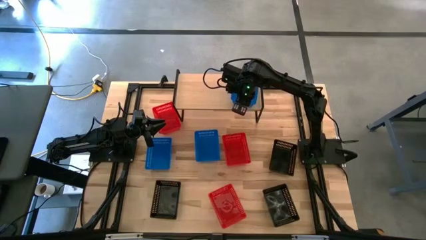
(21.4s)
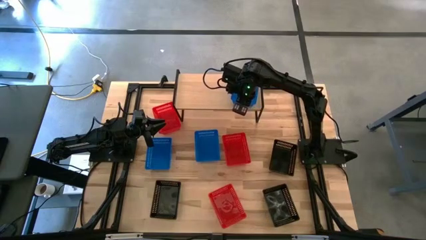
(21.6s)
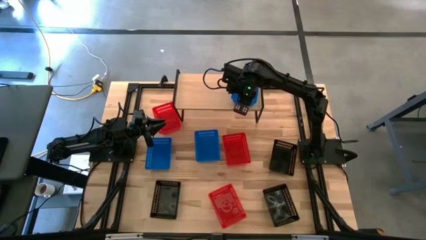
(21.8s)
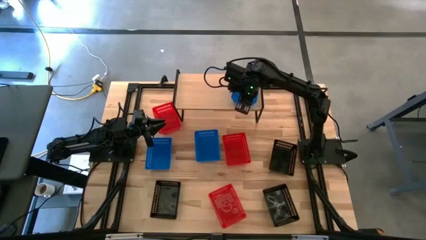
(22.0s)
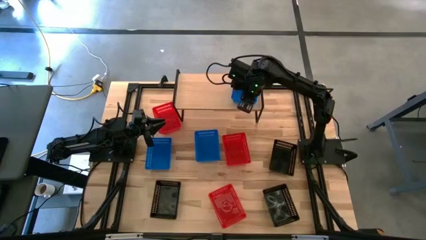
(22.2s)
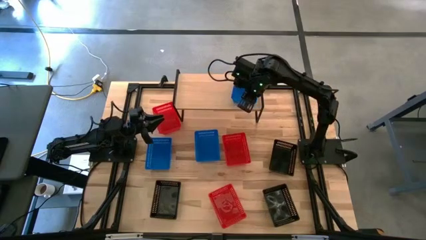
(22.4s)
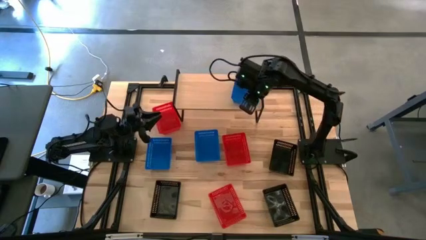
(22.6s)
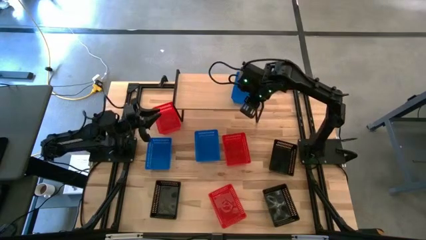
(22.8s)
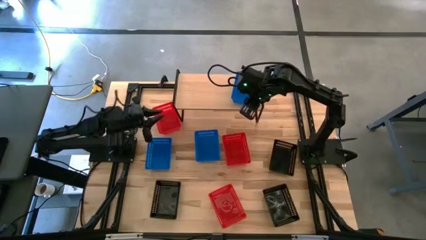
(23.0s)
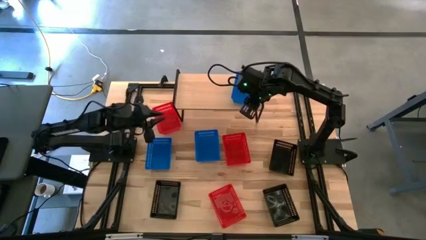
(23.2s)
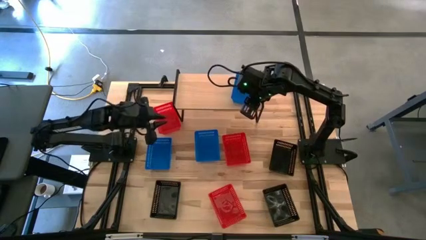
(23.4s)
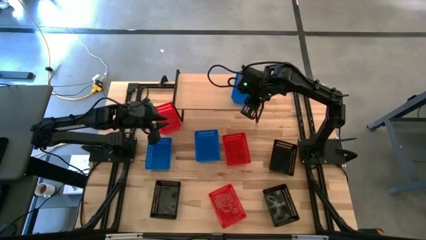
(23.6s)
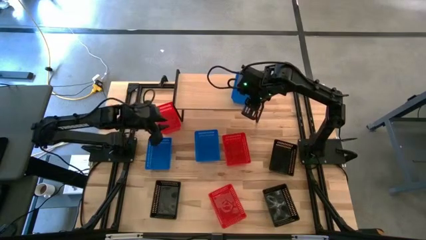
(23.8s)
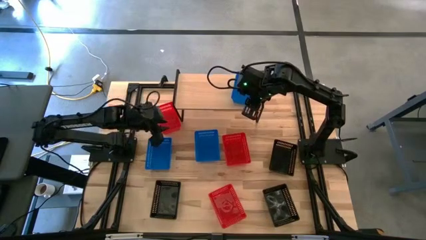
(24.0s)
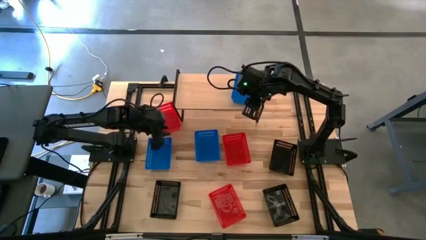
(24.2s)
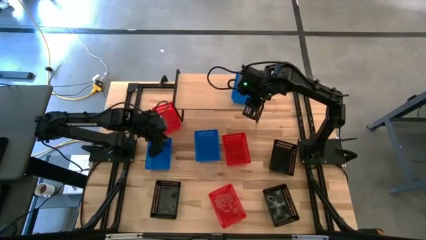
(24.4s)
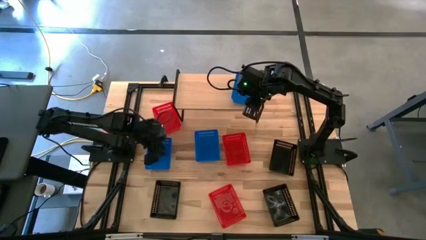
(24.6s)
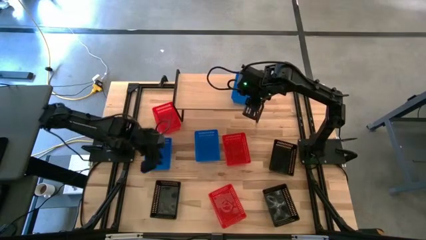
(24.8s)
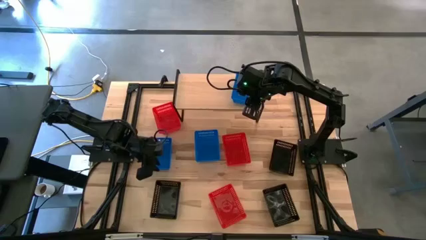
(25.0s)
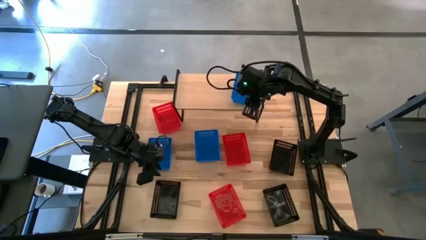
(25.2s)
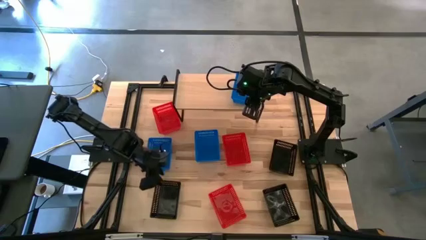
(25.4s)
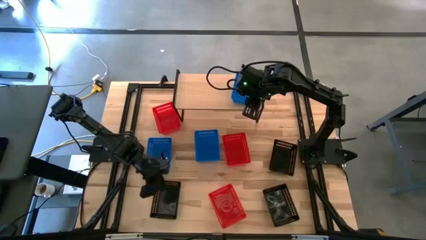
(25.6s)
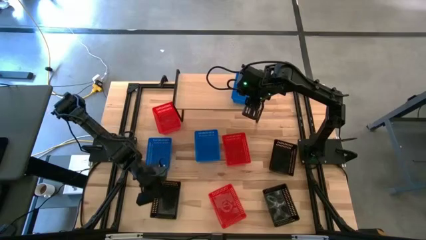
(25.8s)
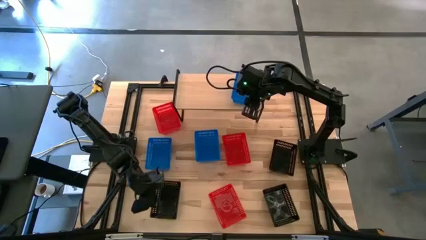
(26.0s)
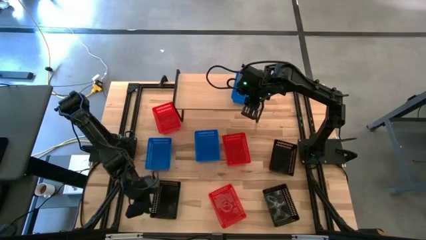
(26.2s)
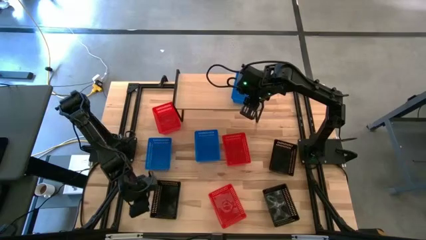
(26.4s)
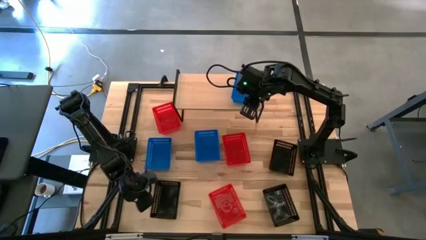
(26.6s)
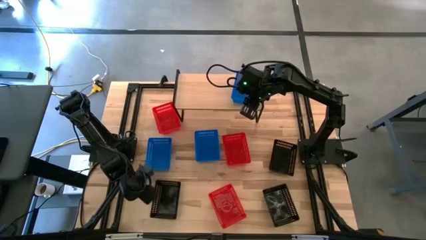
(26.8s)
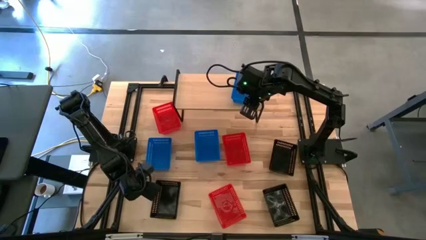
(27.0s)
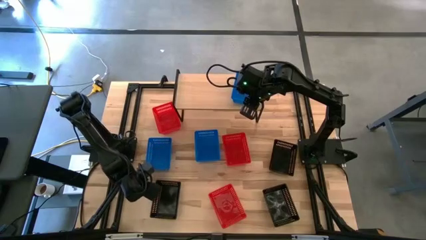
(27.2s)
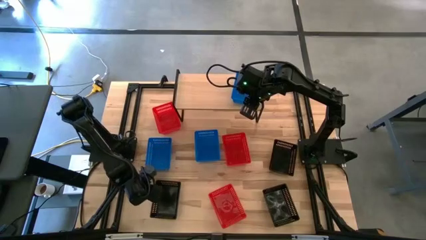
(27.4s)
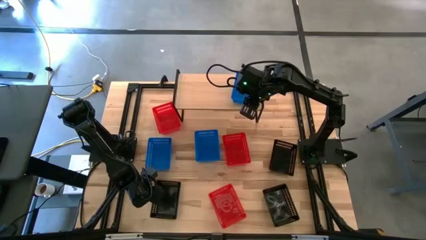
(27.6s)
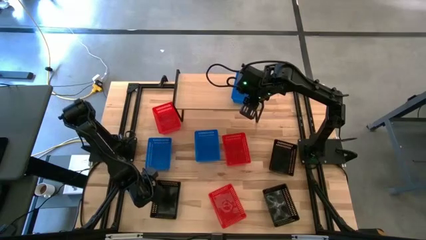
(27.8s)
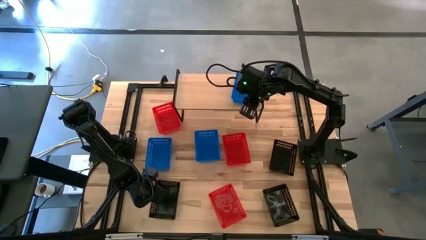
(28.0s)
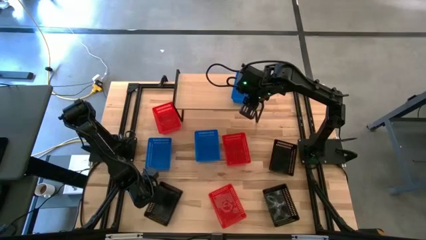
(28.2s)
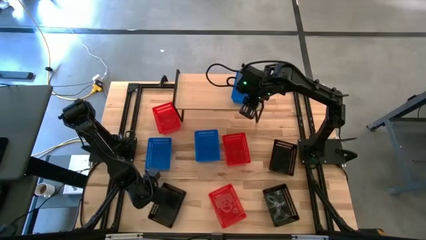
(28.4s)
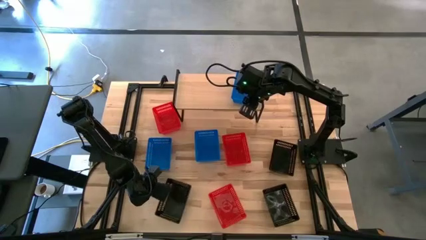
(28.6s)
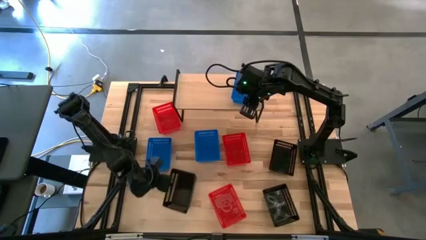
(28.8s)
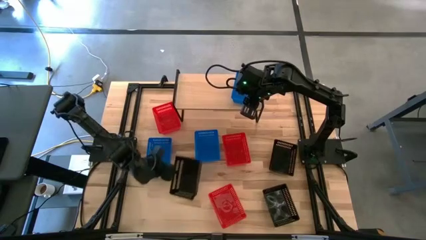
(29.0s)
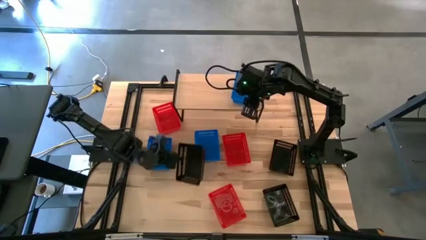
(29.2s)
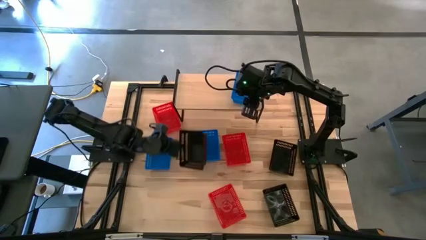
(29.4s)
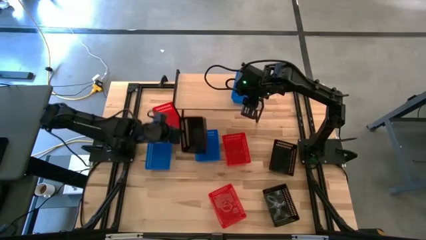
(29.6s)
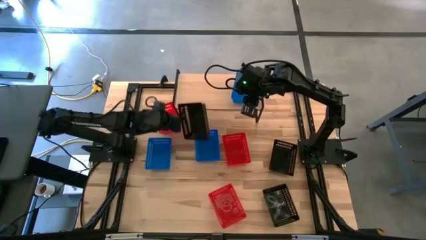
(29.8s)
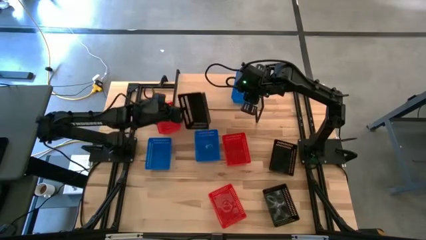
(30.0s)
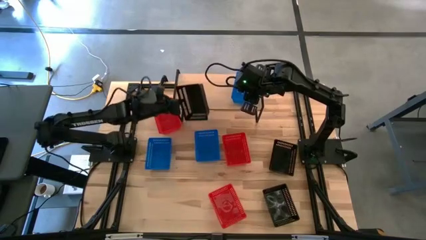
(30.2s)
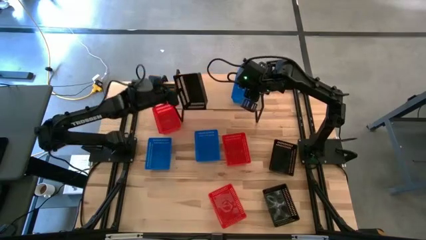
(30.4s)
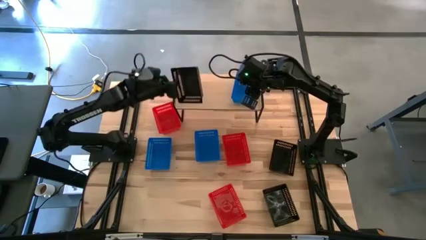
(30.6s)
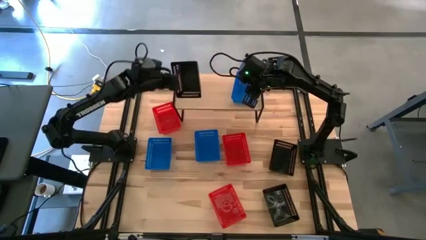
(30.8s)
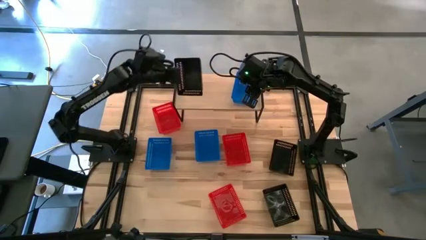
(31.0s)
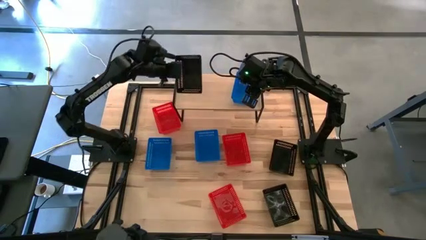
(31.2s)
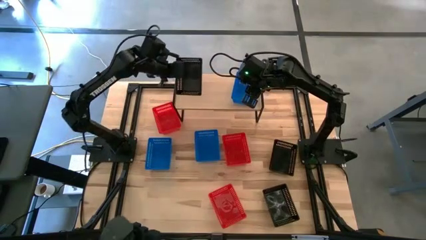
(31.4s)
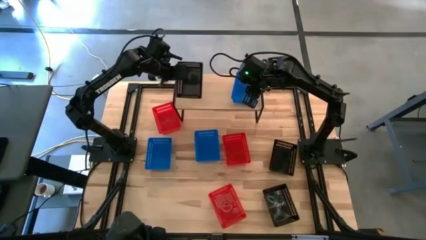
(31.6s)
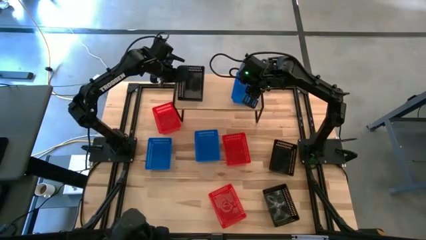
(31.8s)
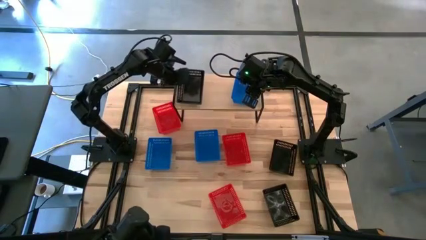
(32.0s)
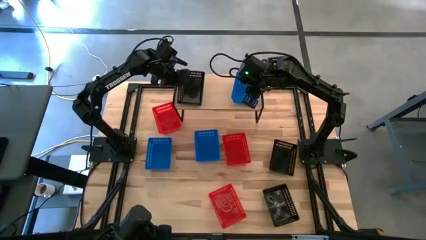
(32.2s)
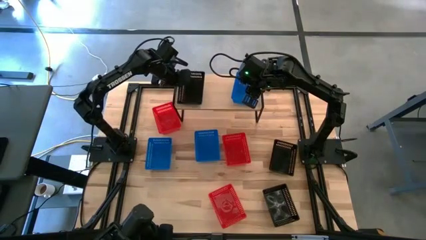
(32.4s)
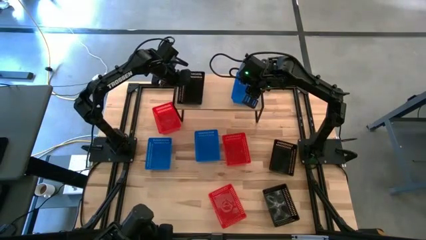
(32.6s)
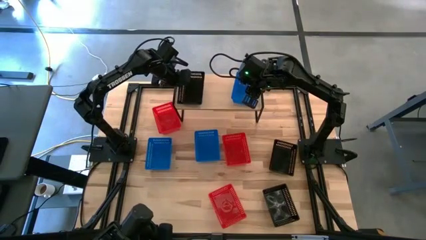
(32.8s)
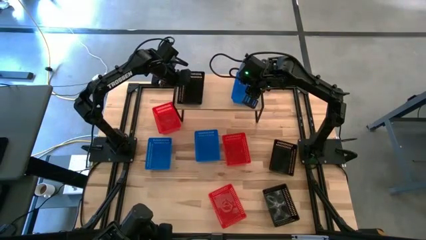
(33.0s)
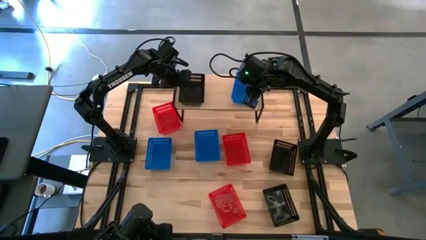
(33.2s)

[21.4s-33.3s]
Task: Stack baskets on shelf by color
Put the left black bin on the shelf

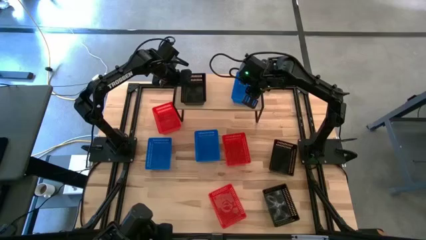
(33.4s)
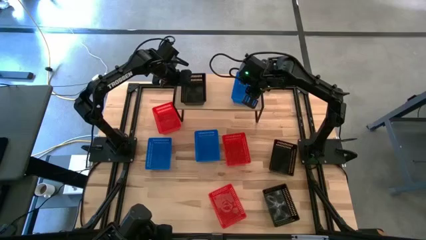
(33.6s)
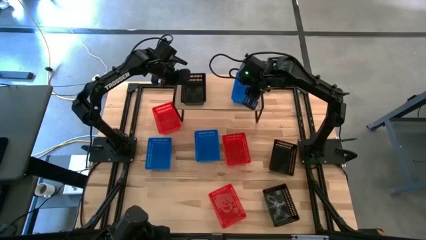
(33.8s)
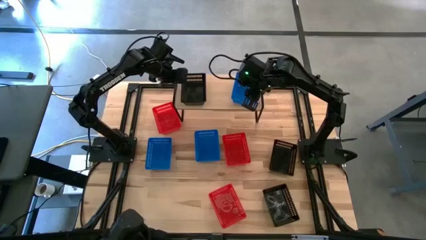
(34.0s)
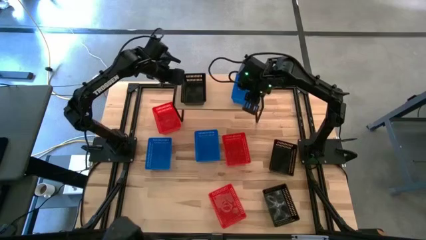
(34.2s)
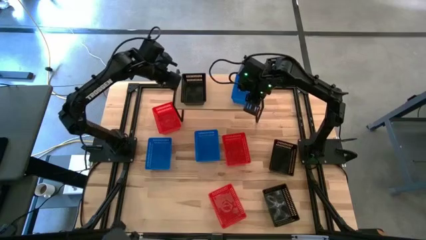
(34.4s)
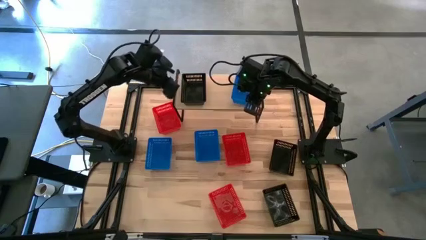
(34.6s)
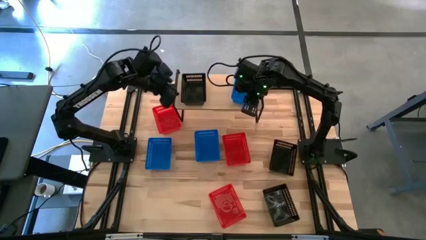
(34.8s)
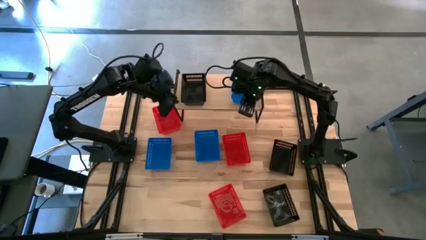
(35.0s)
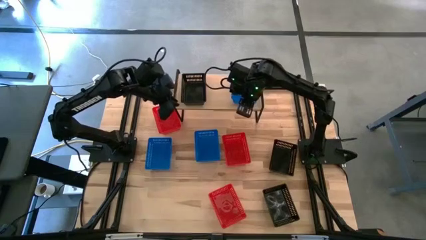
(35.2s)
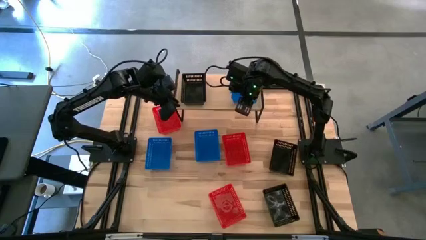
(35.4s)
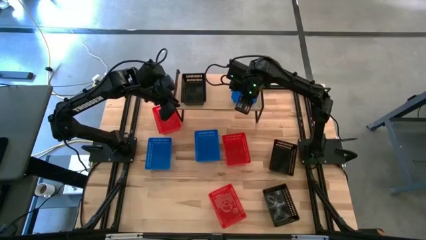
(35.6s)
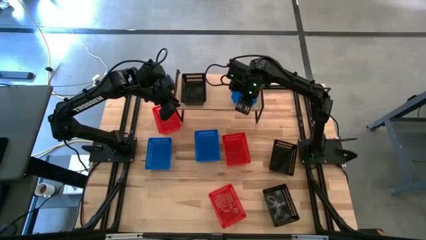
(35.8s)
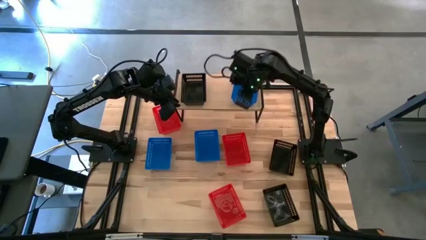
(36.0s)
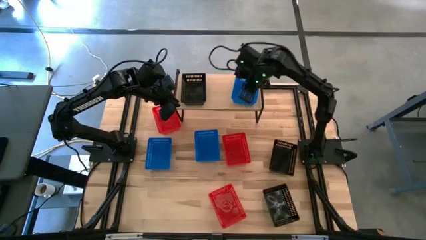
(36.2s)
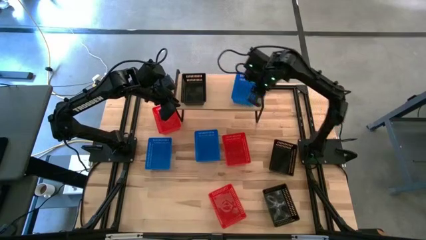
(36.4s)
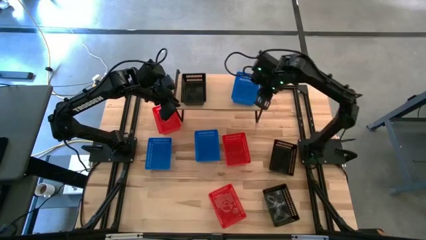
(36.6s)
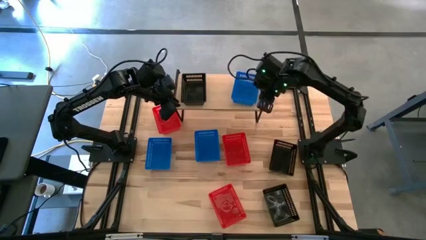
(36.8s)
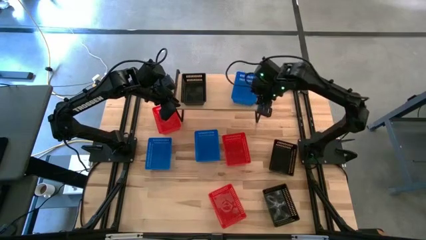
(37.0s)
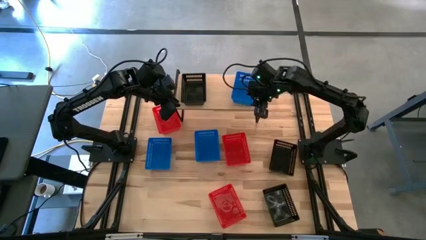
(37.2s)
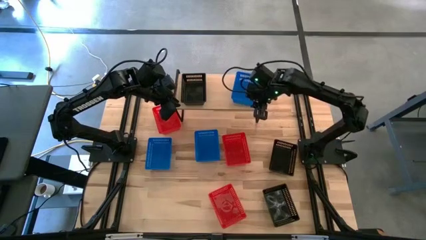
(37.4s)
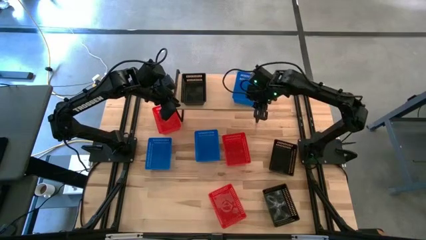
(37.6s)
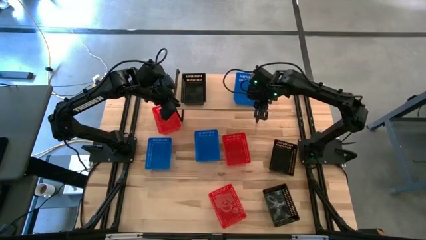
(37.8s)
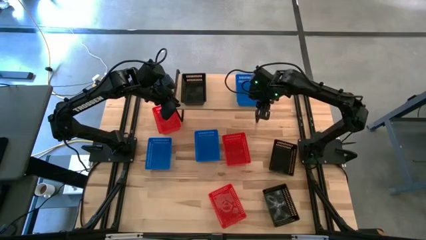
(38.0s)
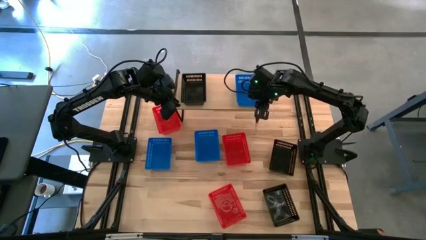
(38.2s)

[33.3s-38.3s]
Adjust the blue bin on the shelf
